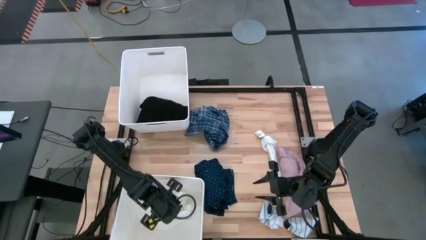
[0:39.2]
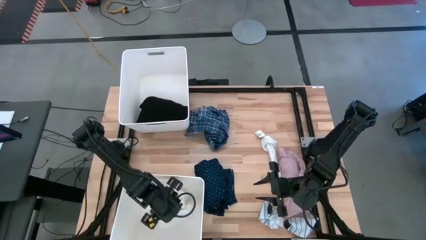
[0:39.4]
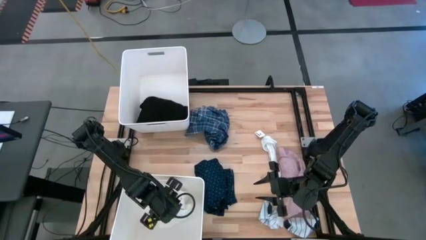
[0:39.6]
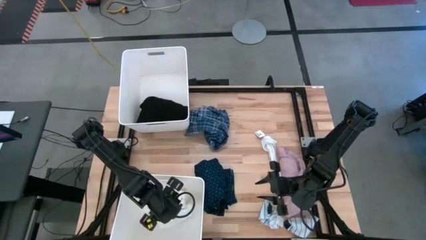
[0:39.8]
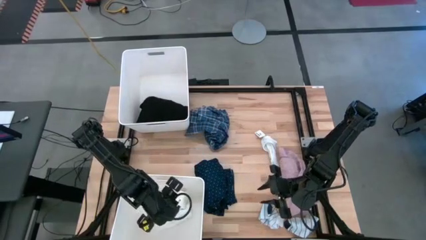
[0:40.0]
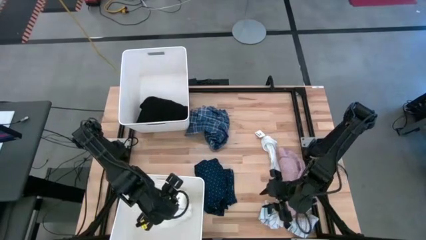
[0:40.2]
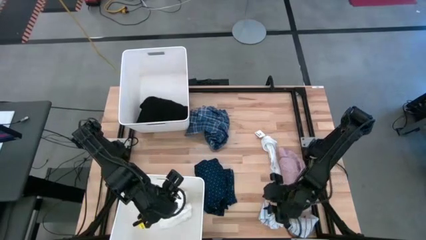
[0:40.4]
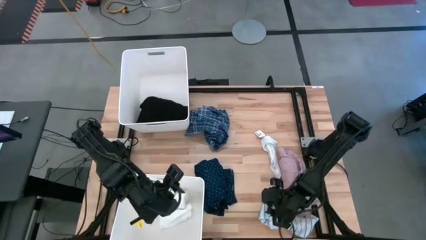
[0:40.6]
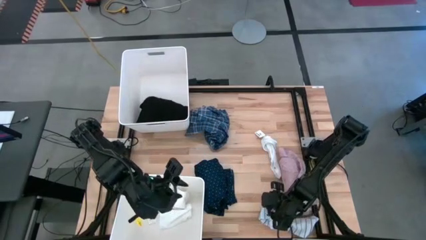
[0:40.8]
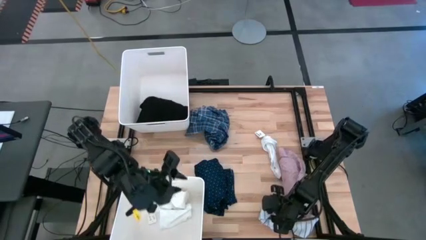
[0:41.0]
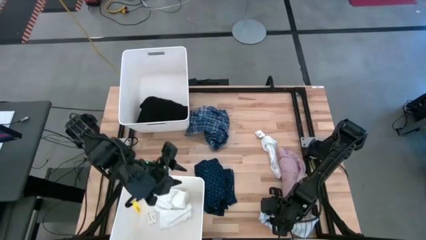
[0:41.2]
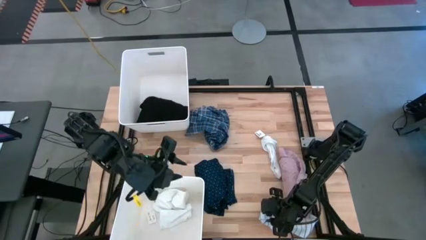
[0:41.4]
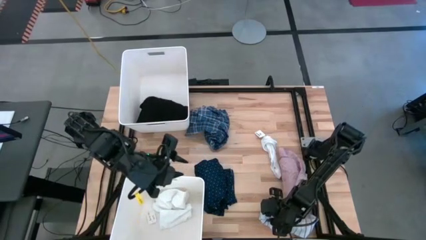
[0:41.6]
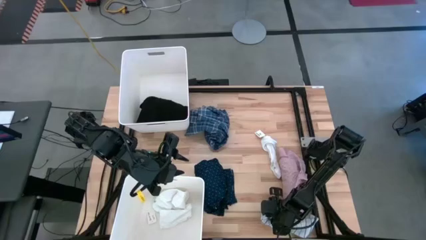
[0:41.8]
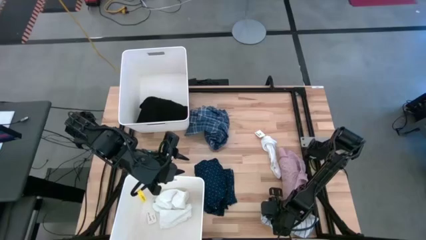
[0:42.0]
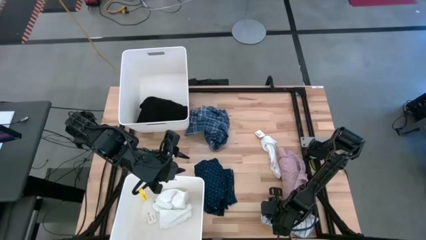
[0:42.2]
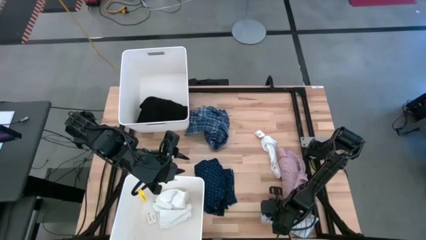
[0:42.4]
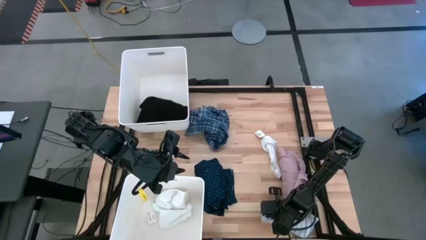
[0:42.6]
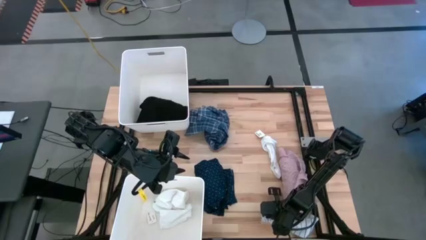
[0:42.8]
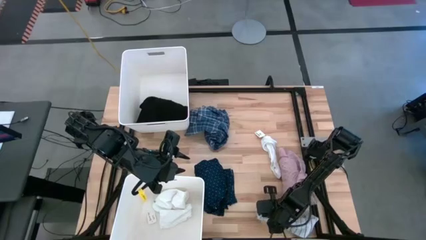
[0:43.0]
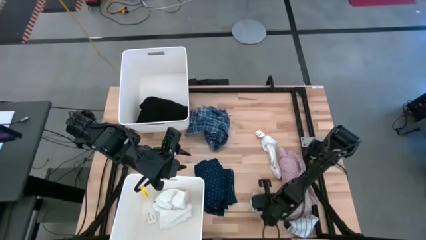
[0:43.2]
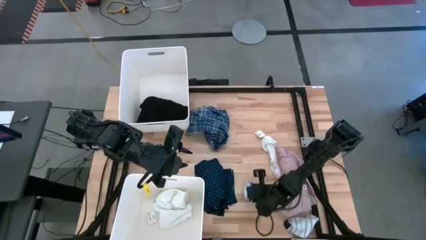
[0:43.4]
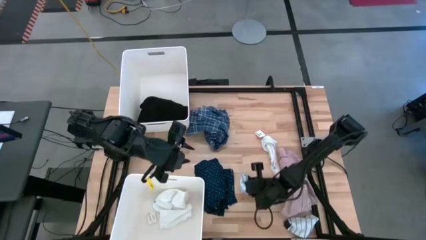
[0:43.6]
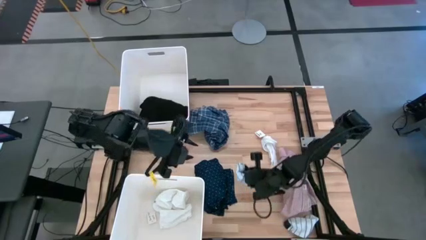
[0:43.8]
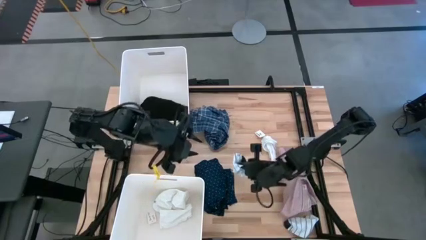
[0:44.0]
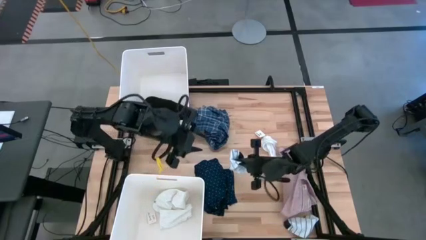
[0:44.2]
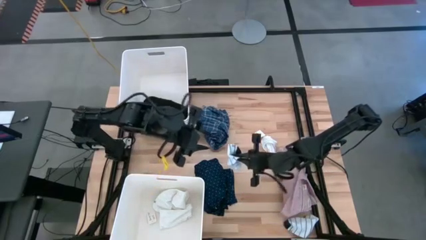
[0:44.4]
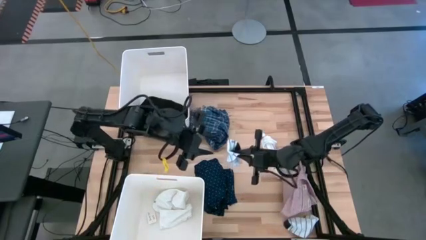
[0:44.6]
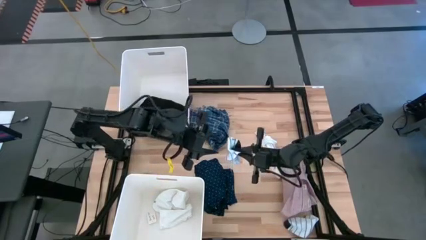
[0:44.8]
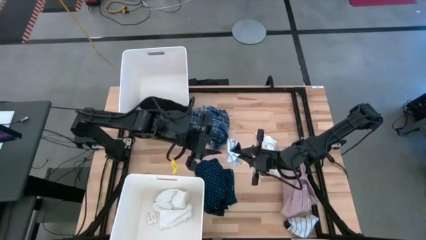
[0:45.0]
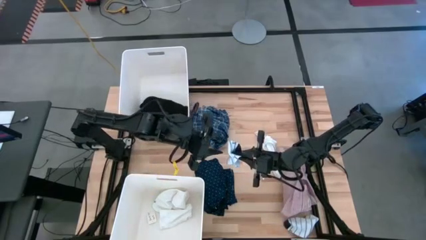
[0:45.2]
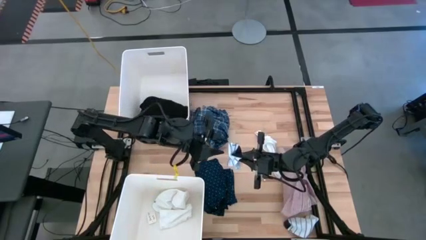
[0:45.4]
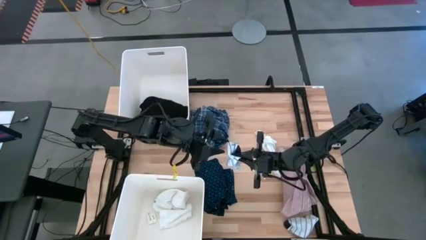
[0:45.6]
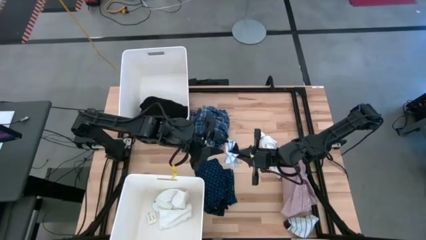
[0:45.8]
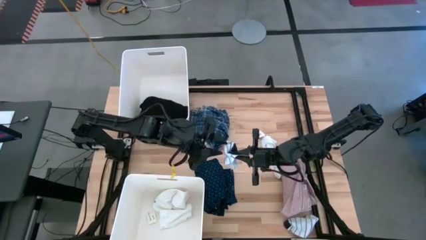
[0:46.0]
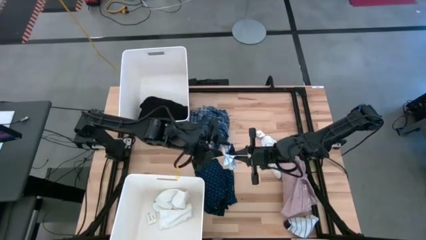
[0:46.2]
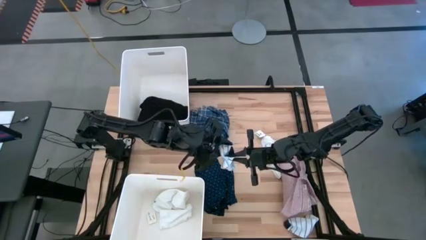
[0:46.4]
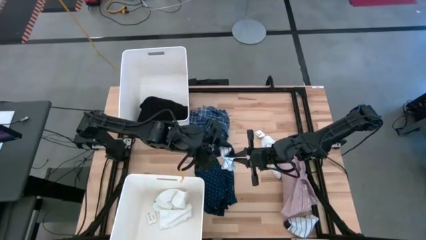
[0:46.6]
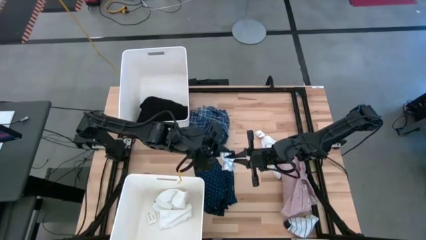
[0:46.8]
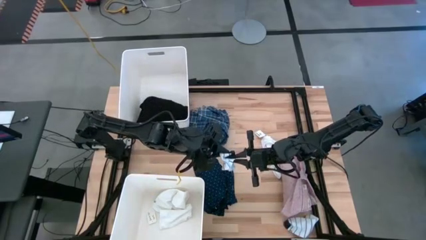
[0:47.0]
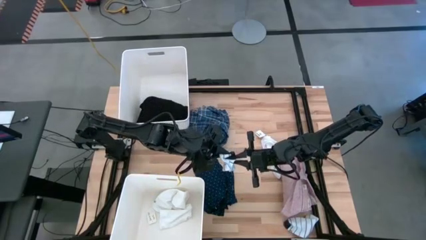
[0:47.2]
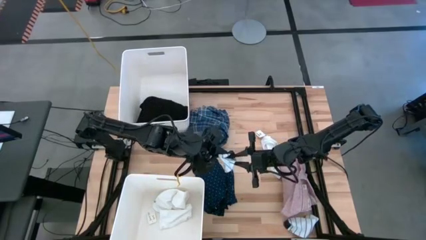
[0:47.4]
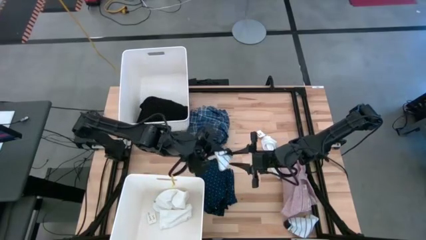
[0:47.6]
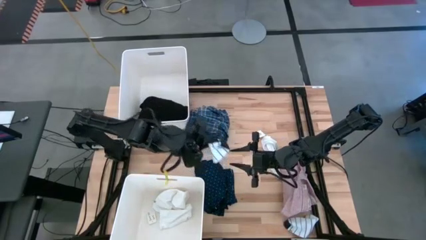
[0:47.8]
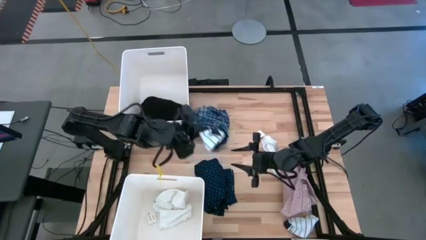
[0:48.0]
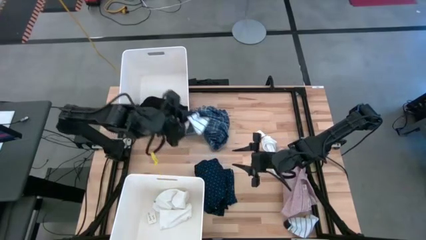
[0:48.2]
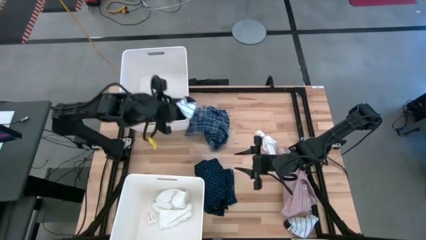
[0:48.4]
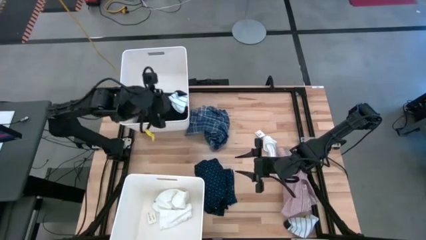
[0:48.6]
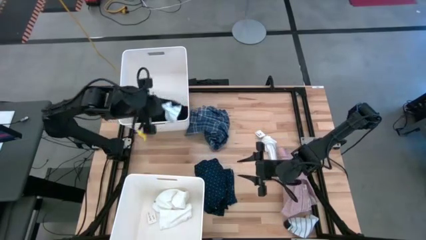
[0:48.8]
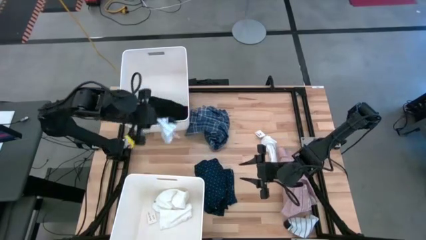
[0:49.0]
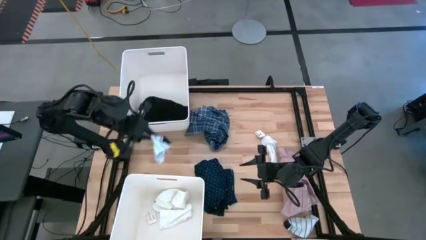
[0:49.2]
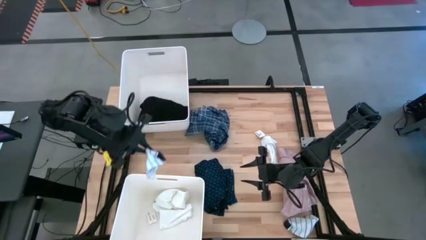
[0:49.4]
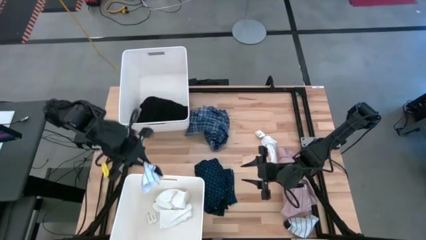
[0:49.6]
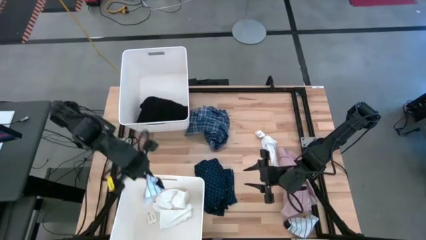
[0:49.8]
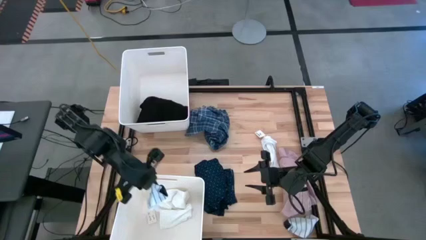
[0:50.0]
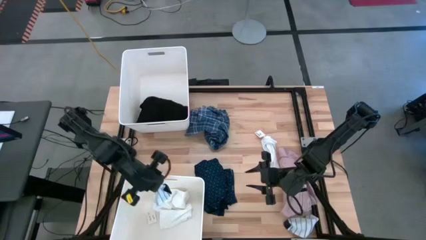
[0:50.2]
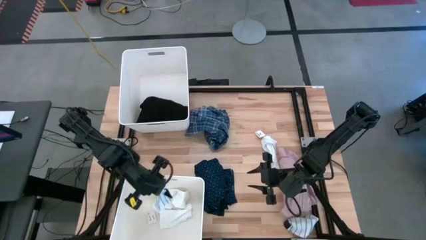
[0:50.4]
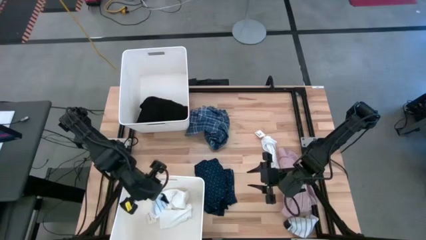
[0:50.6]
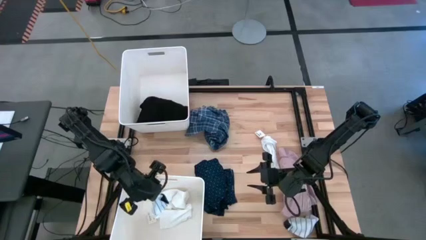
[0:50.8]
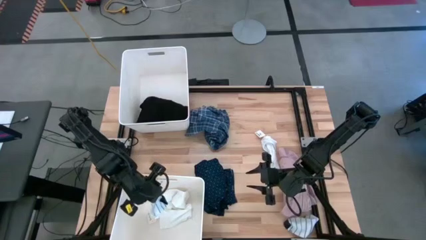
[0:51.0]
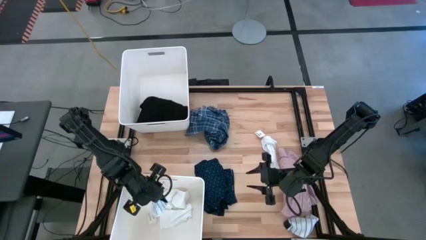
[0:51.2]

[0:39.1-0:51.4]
Task: Sort clothes
Put the left white striped sock into the bottom white bin

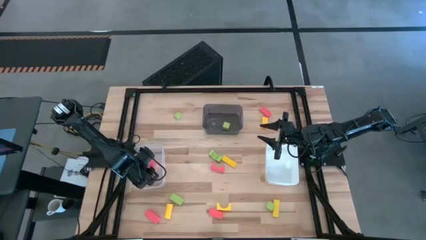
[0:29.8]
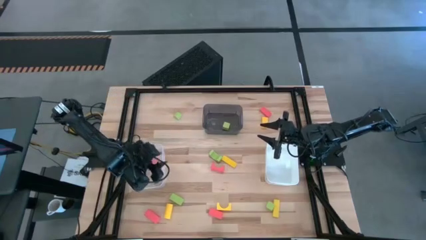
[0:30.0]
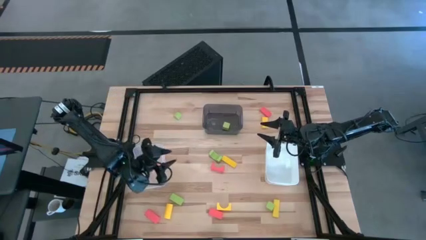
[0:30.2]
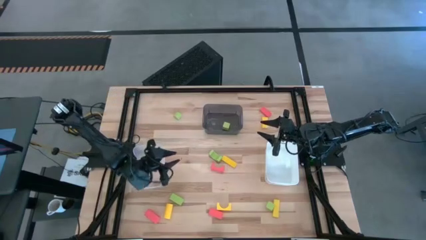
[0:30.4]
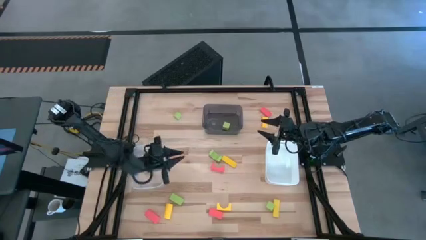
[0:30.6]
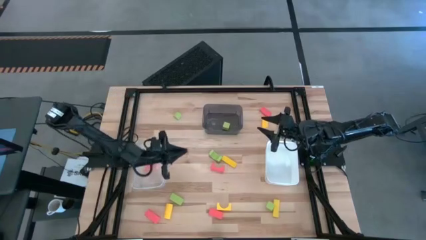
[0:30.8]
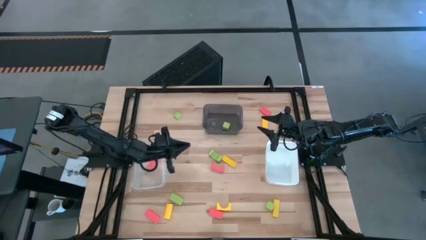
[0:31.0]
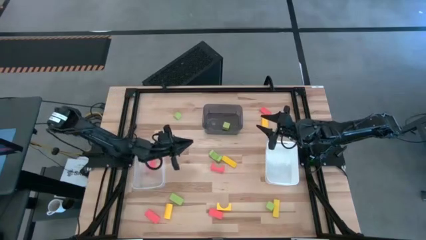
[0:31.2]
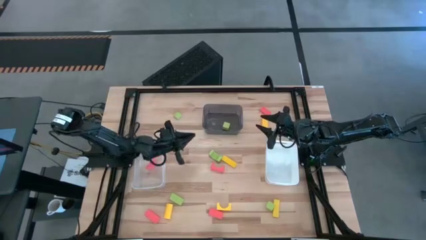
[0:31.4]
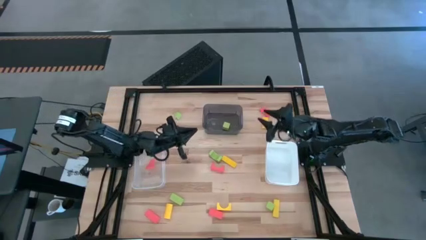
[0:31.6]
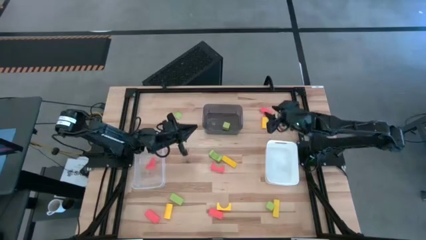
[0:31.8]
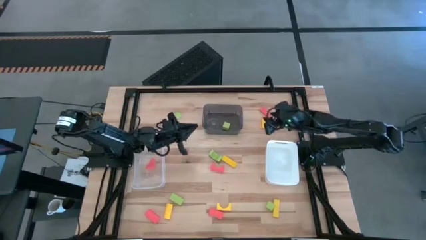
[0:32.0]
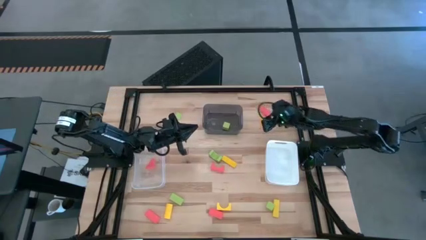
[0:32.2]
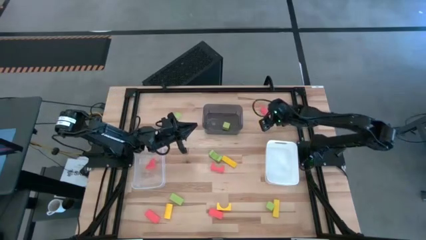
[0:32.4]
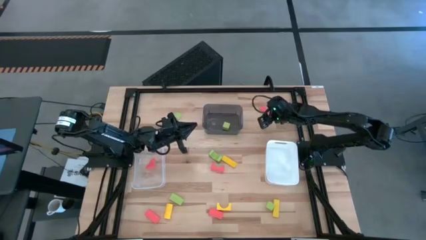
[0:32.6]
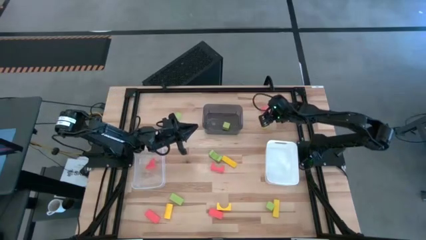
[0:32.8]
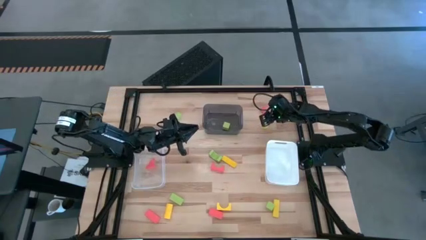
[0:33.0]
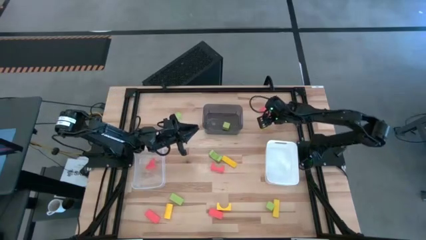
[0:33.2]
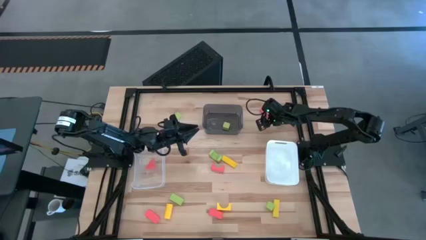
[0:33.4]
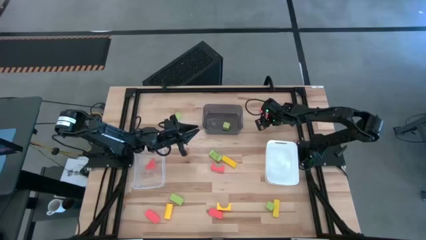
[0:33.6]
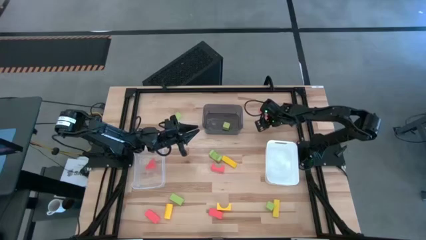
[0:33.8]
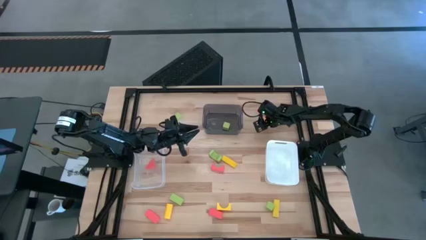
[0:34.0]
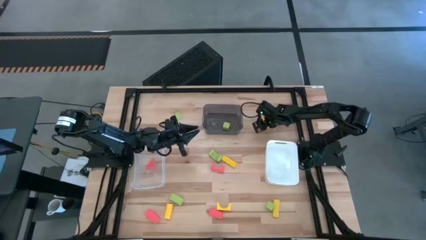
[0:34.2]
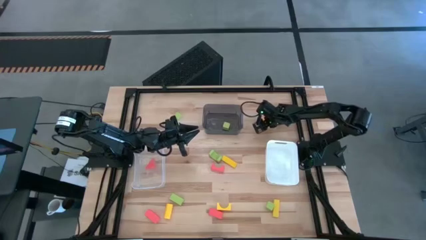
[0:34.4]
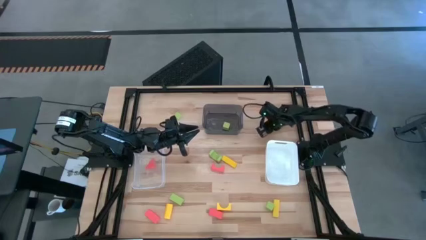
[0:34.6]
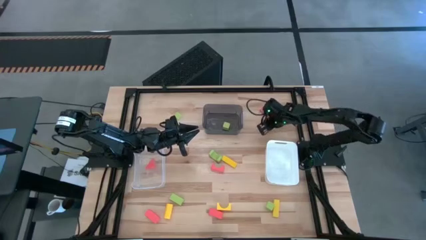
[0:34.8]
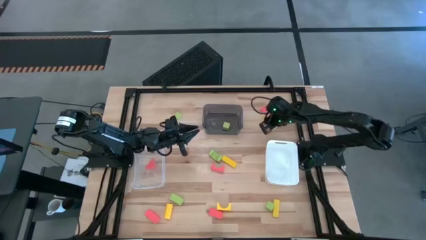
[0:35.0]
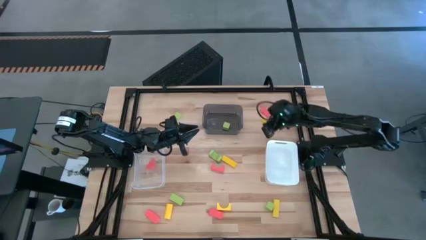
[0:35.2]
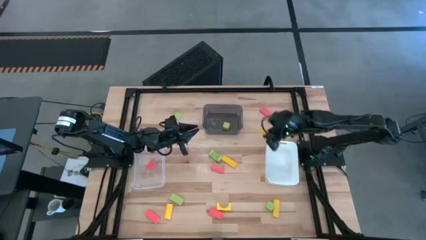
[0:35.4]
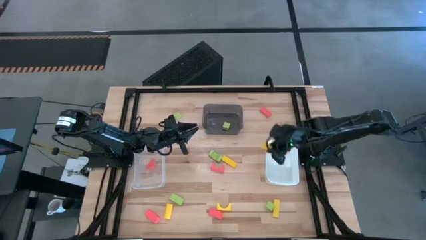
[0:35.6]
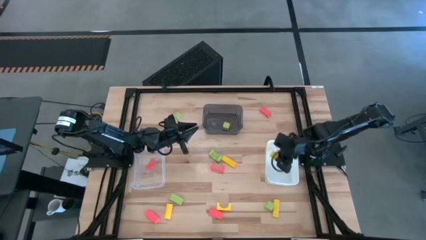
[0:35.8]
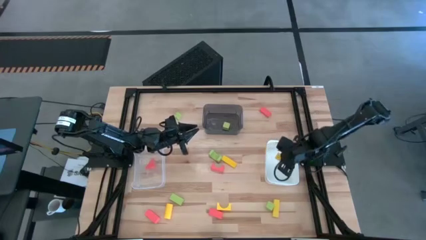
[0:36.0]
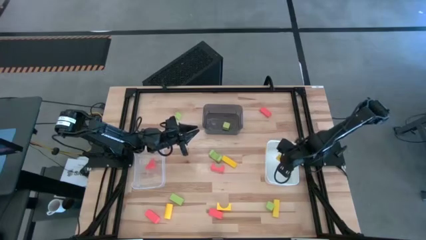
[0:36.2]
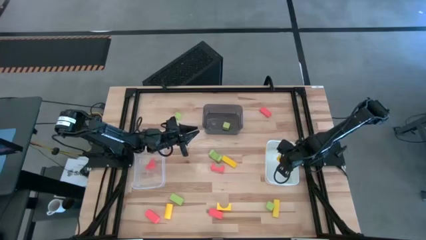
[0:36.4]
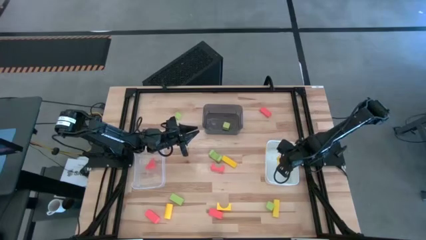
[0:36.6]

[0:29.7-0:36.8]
Task: Sort & place blocks by color
Put the yellow block into the white bin
